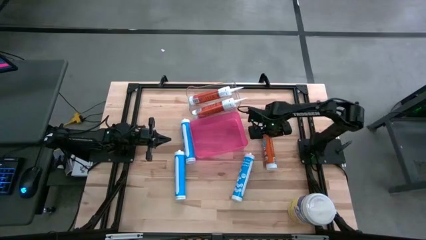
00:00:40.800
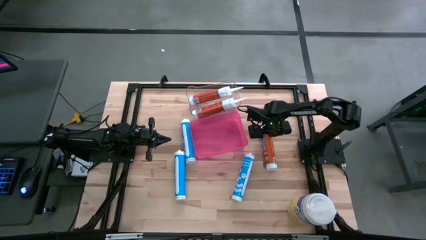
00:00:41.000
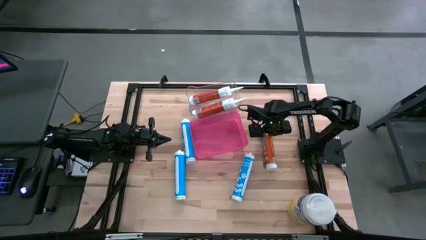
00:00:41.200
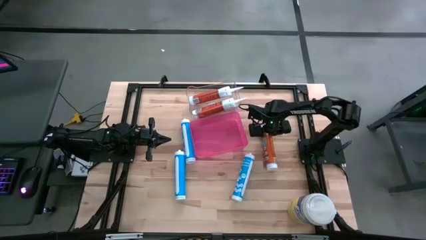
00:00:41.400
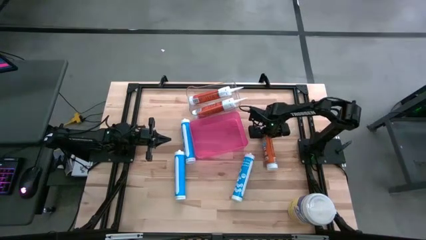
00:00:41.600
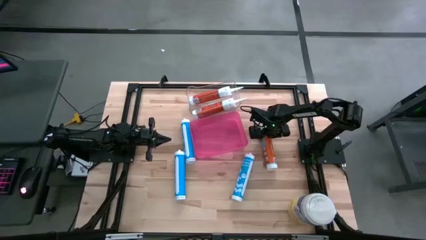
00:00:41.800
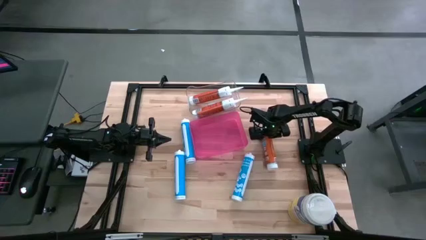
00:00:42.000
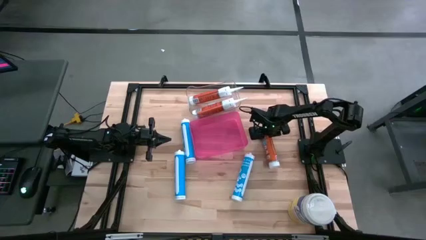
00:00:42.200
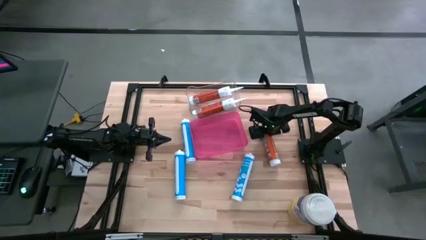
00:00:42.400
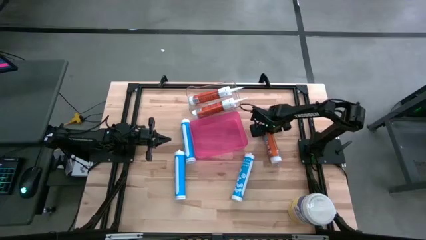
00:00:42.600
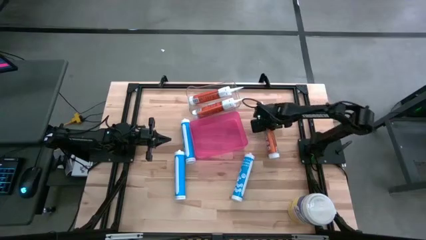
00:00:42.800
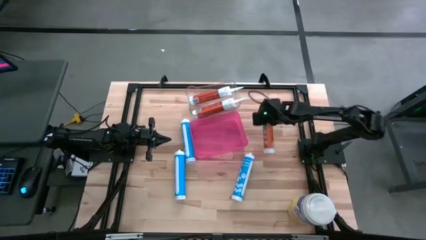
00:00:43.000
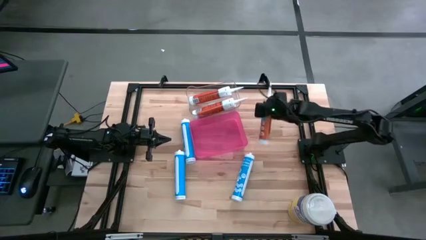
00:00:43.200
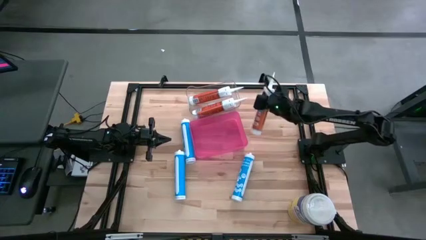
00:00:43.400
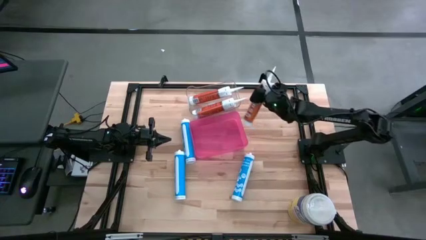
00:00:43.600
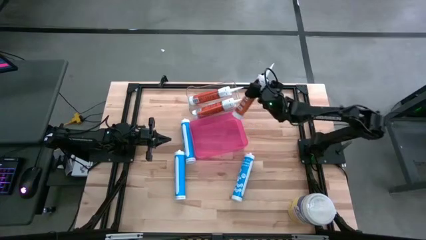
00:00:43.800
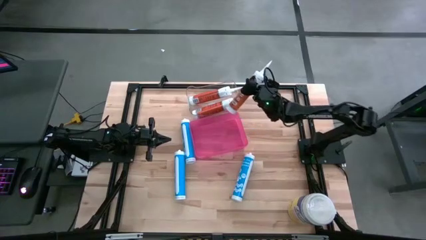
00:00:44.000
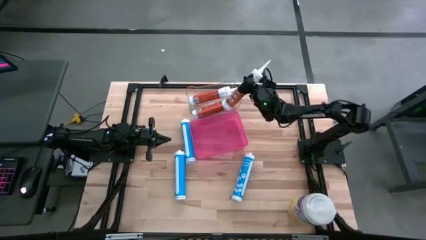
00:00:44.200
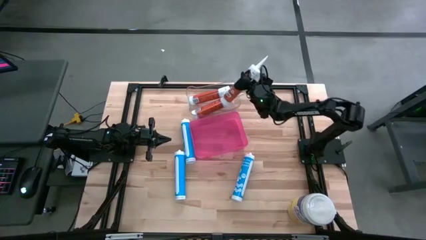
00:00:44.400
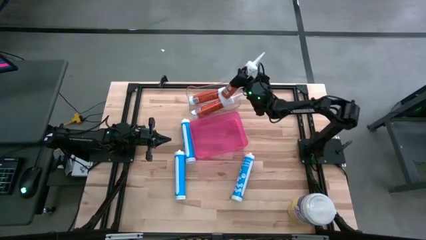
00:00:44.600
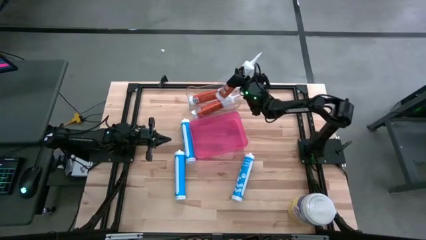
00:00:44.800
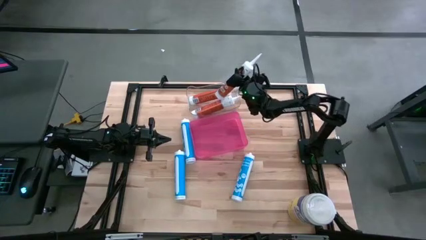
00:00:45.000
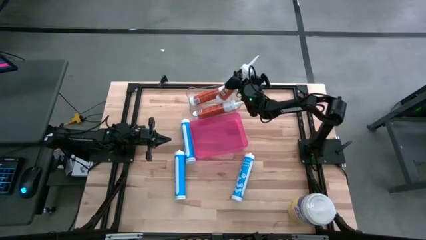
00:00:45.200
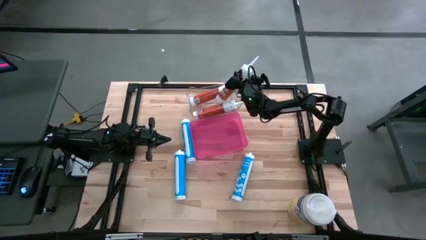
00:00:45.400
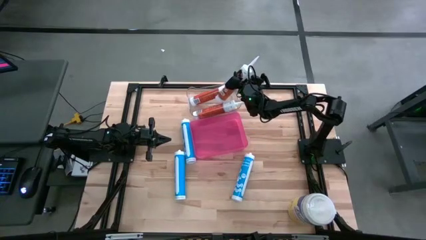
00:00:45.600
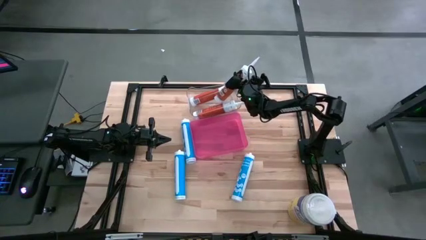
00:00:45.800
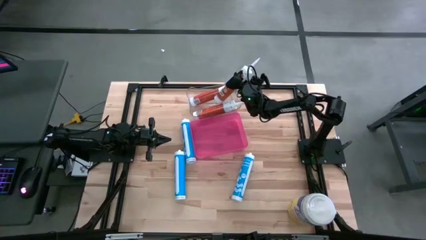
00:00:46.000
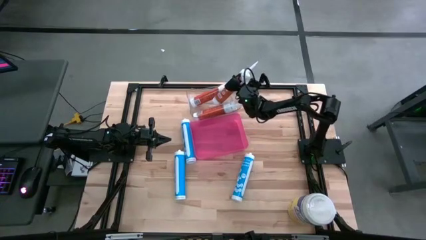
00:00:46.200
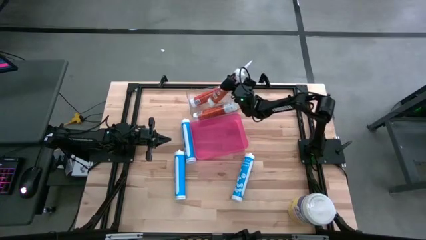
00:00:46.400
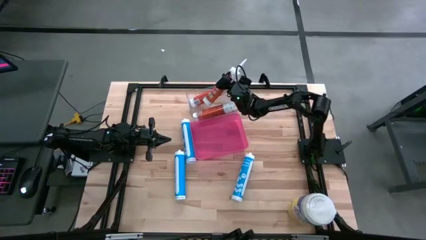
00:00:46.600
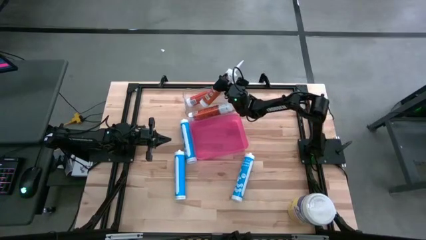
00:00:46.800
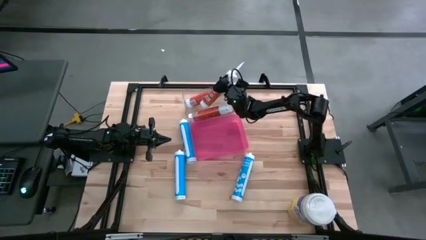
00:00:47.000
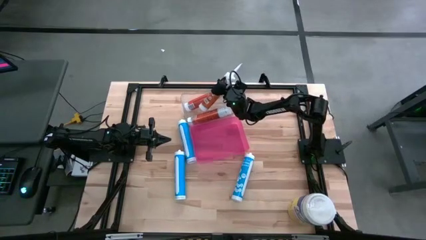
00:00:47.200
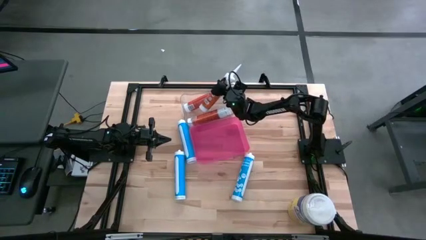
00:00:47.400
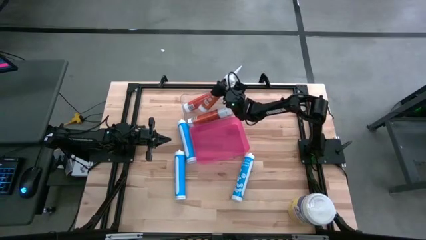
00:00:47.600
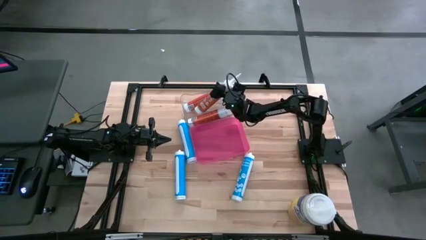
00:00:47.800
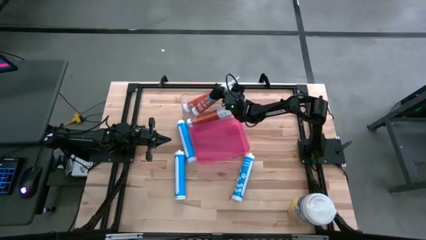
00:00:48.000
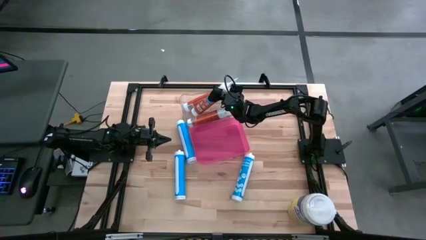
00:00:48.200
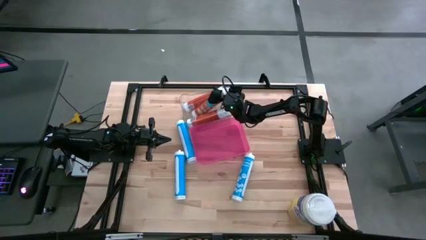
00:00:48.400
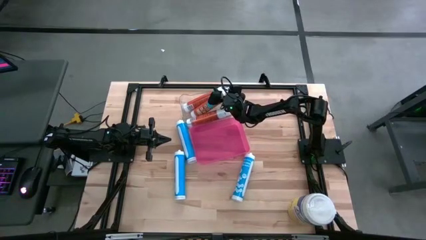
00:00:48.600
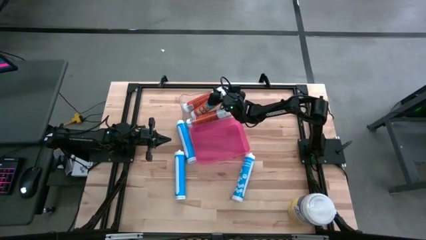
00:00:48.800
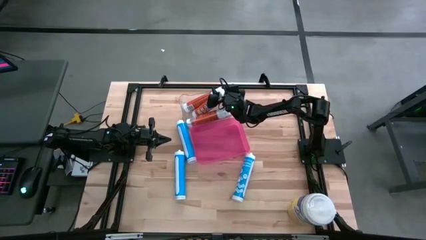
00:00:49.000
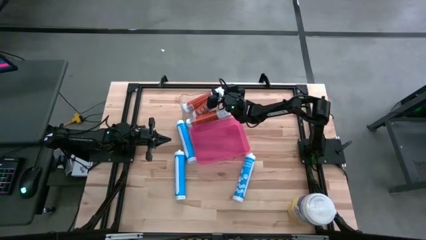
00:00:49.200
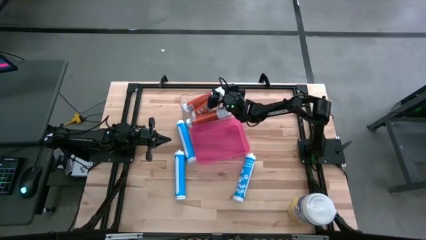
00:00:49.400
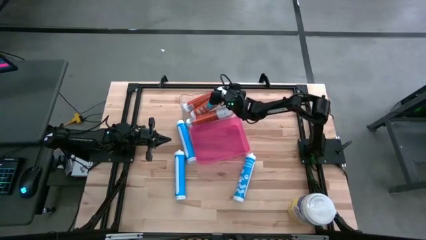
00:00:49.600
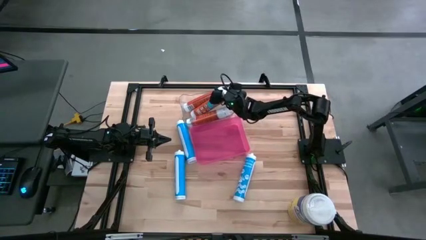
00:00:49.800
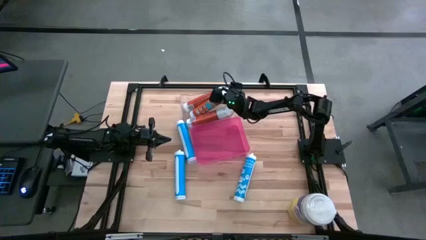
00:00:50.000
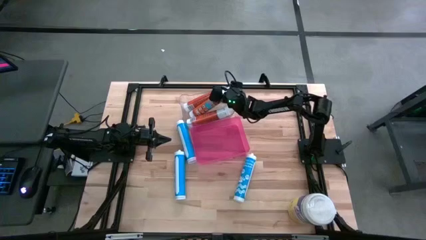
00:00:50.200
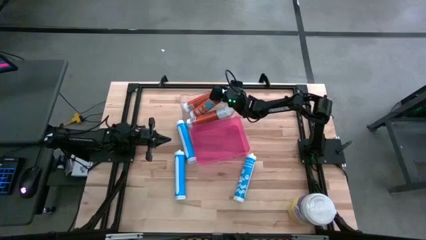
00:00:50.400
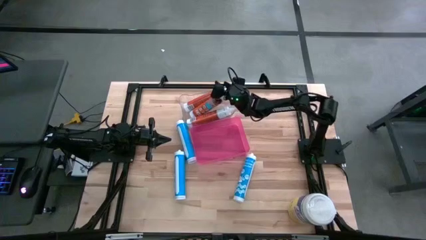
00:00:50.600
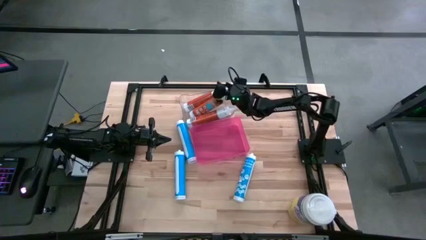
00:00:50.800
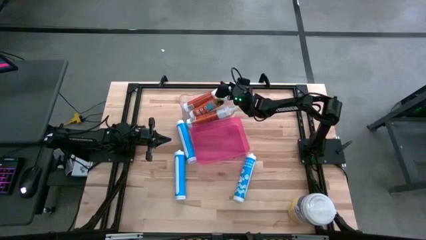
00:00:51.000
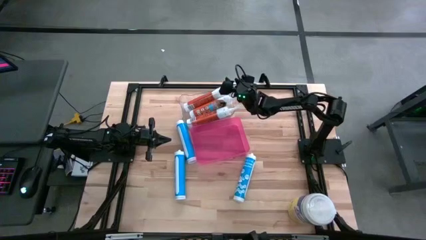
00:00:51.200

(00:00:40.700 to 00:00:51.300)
Task: Pick & place silicon tubes, Sealant and Lysol wipes
Put the orange sealant into the transparent bin

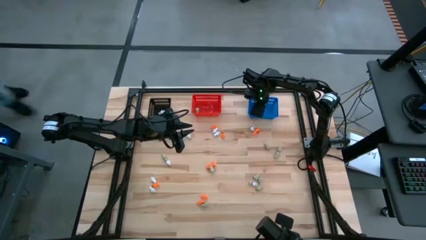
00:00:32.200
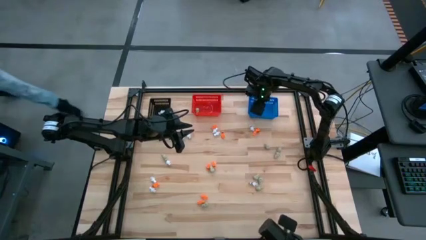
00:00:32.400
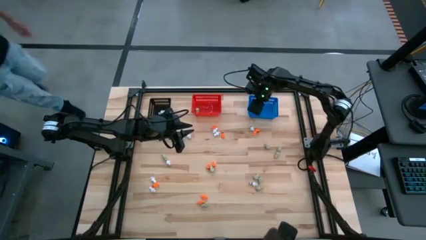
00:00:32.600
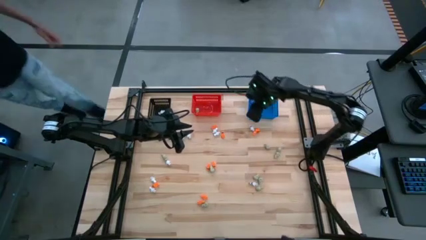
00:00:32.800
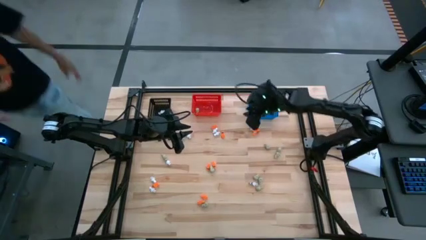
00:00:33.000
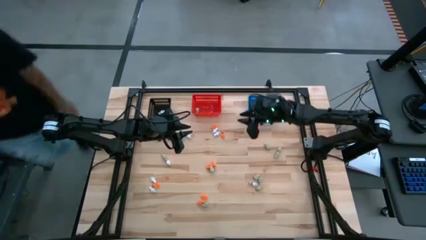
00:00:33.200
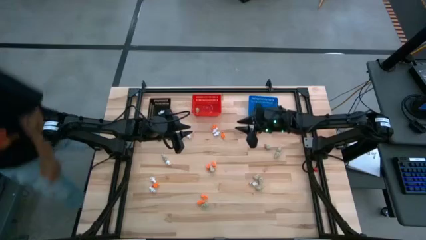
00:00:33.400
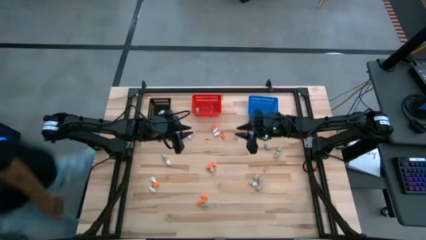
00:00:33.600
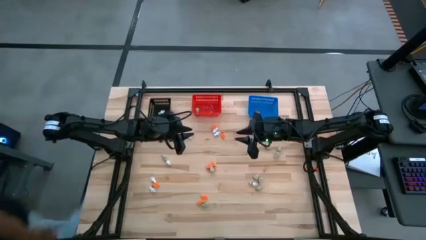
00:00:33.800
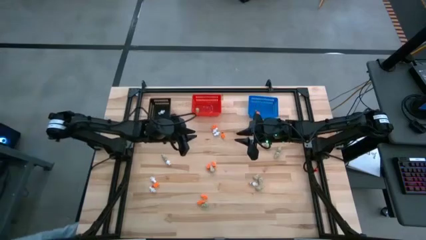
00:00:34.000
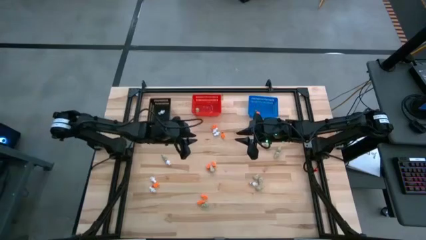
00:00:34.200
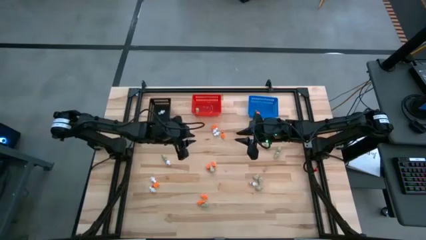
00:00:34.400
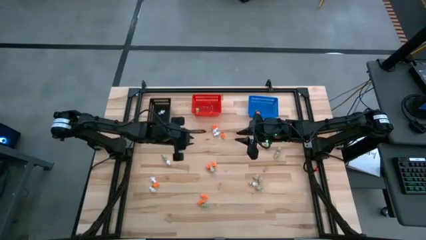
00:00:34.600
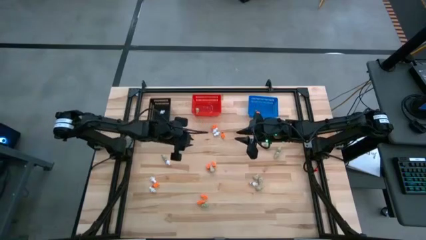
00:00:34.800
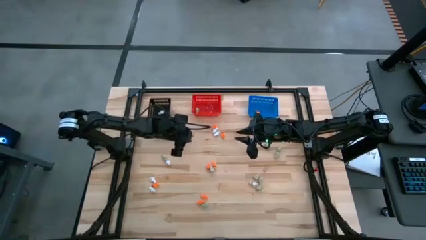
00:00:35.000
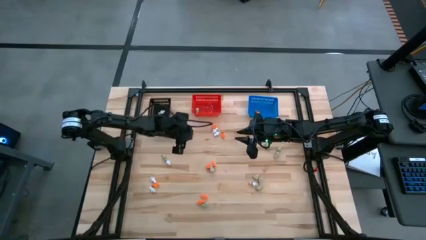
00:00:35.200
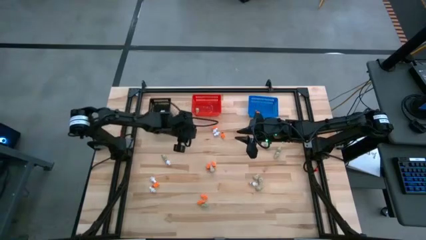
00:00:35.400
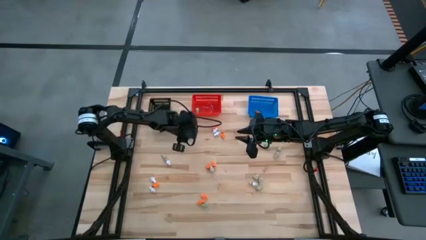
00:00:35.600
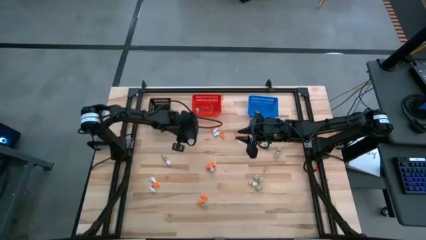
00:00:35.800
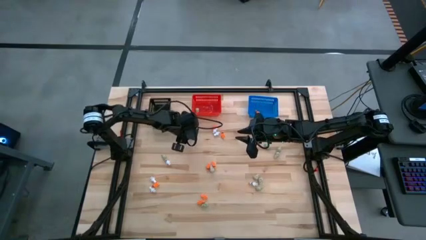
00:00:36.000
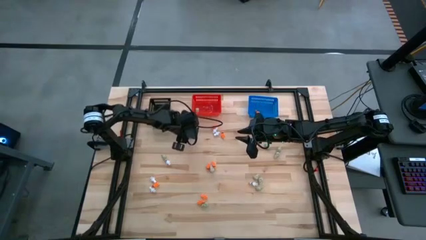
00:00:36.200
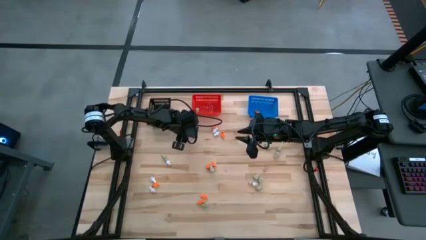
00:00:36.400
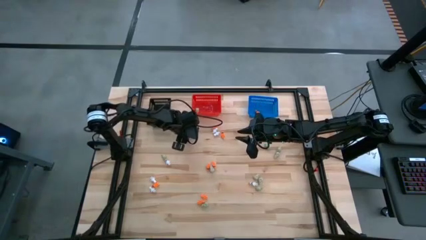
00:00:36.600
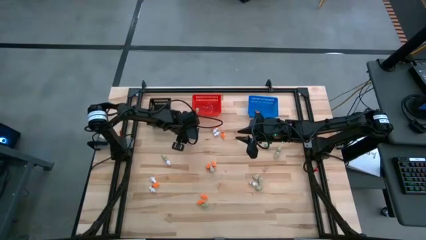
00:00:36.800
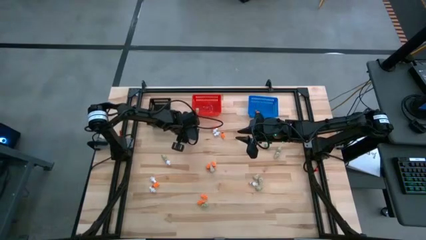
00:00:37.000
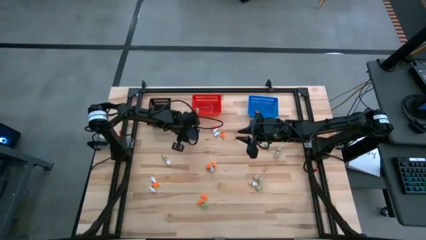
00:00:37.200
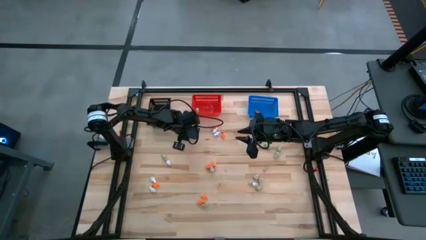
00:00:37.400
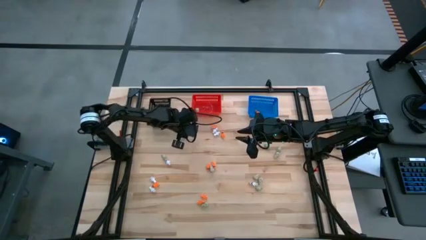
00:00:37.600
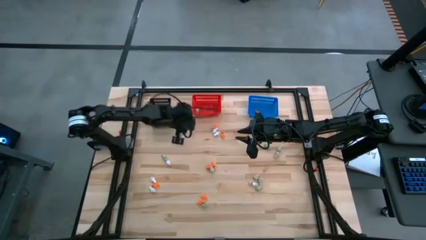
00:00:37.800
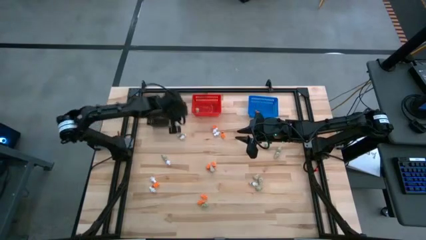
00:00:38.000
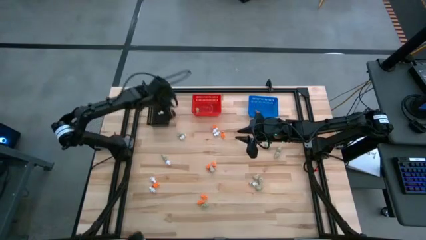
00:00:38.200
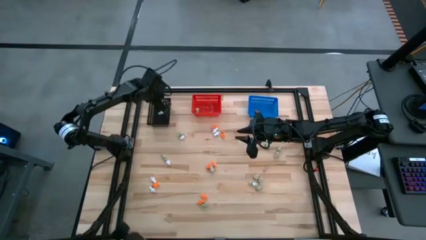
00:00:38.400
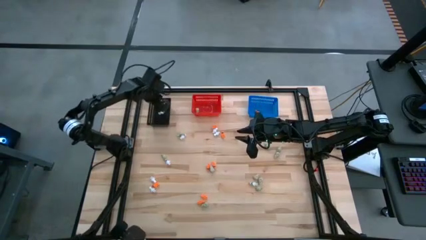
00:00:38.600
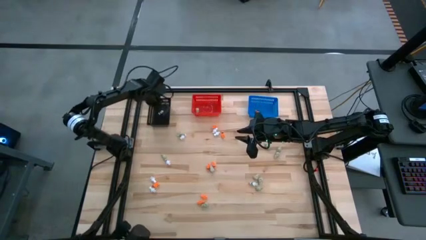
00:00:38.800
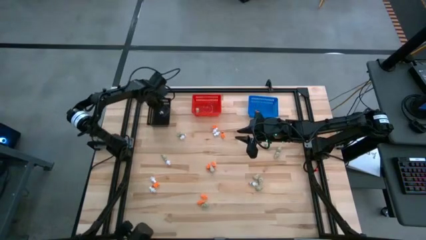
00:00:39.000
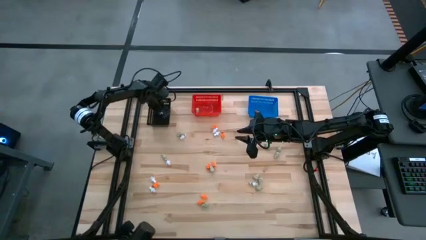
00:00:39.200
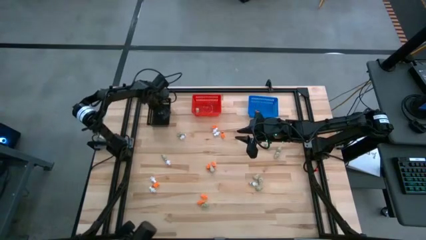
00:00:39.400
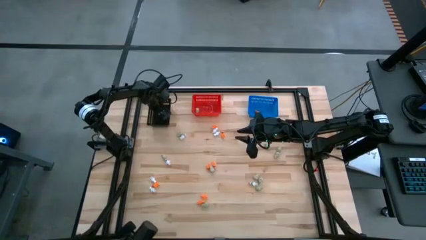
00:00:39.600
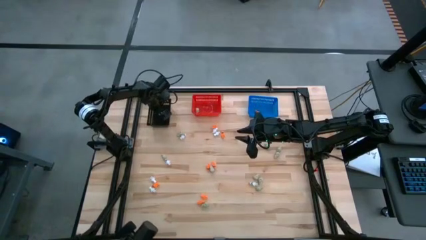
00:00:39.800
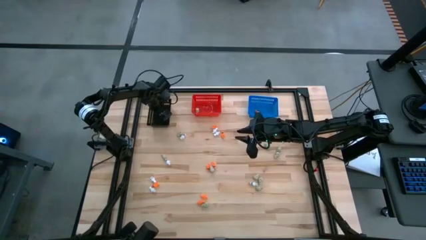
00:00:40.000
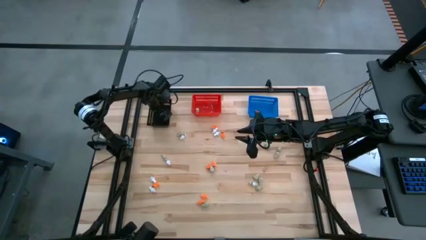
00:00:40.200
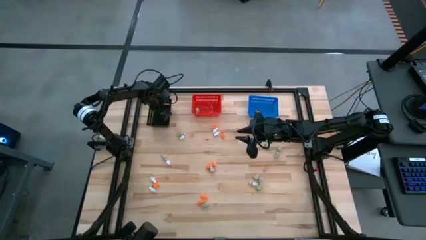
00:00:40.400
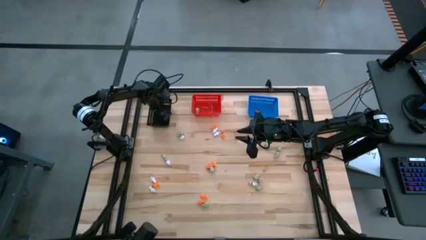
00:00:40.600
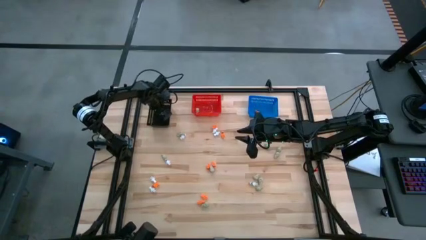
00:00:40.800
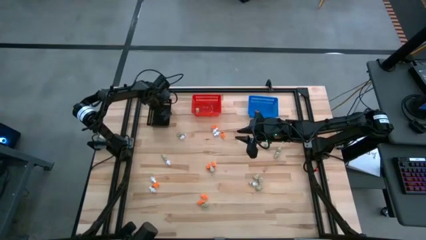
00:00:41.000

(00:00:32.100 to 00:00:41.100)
Task: Sort Halloween decoration
Put the white skeleton toy into the black bin
